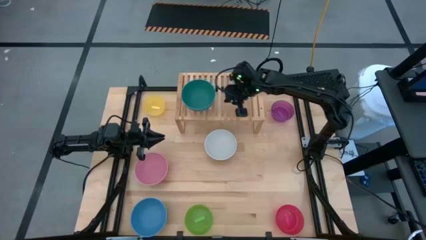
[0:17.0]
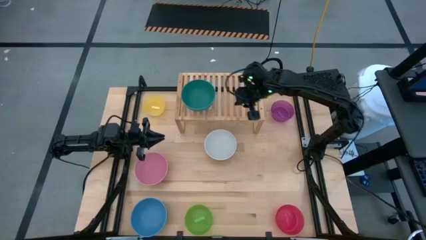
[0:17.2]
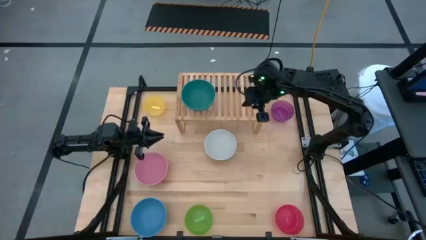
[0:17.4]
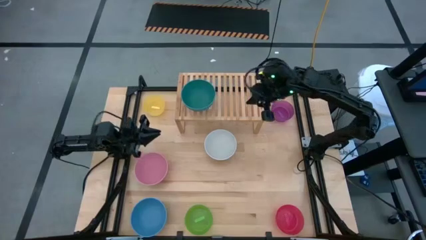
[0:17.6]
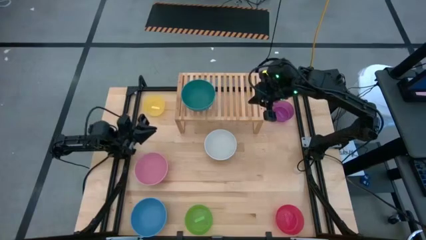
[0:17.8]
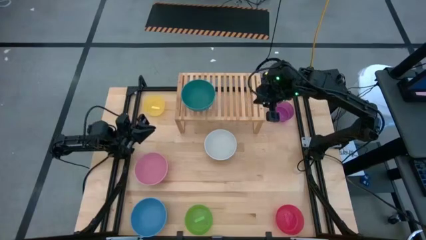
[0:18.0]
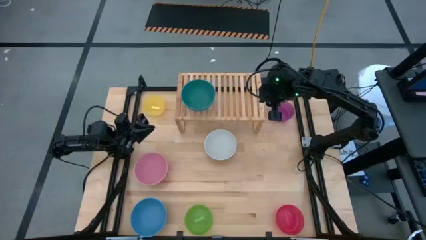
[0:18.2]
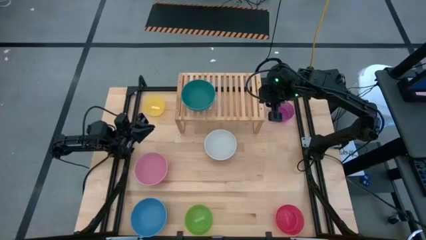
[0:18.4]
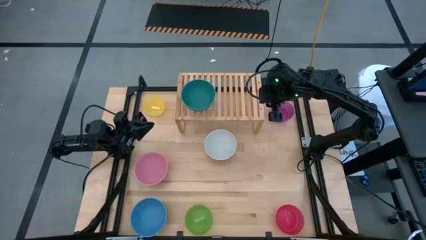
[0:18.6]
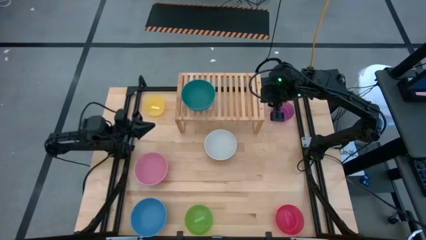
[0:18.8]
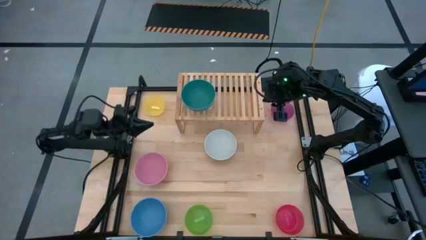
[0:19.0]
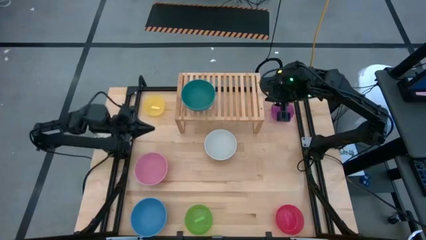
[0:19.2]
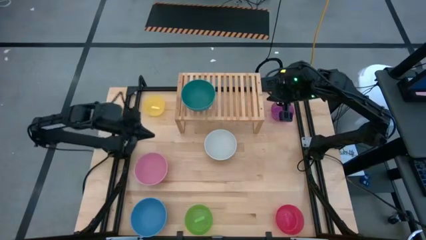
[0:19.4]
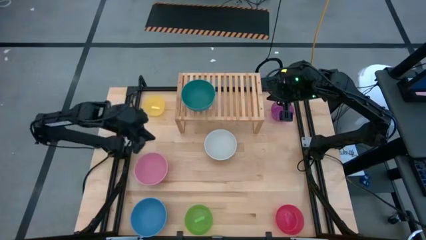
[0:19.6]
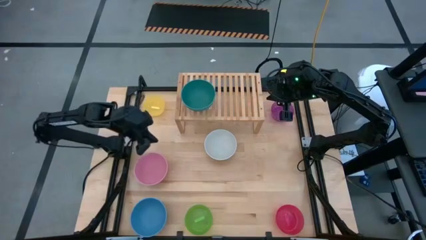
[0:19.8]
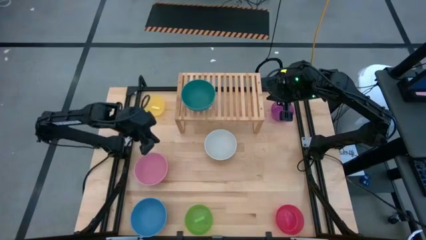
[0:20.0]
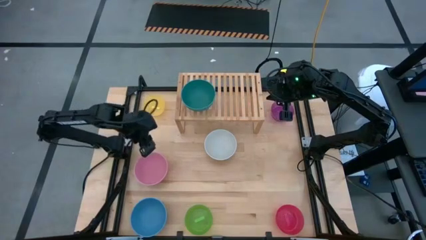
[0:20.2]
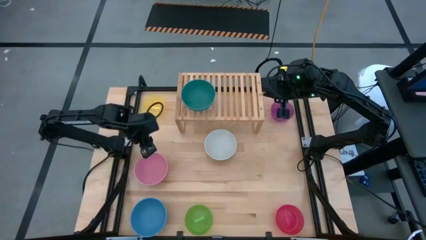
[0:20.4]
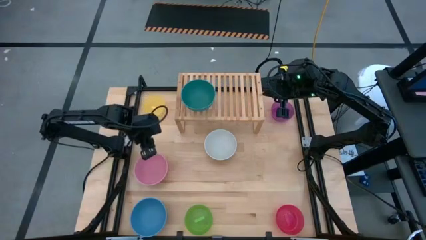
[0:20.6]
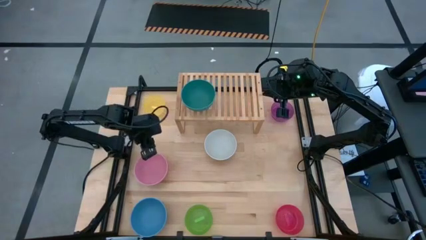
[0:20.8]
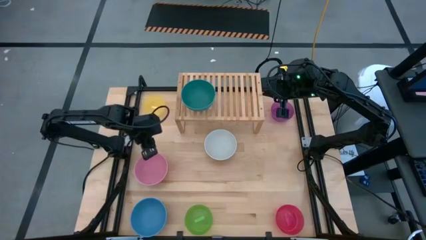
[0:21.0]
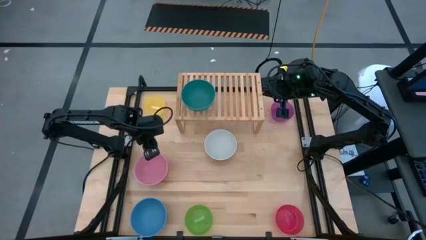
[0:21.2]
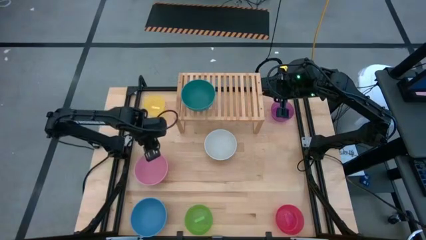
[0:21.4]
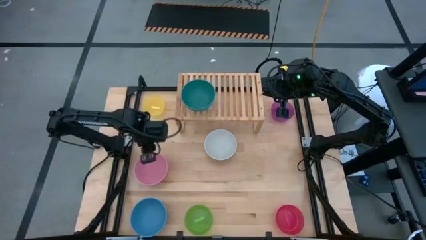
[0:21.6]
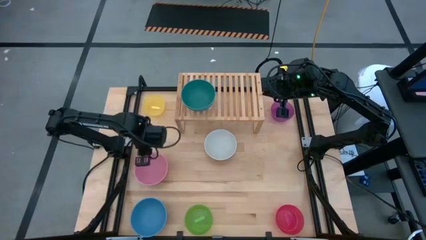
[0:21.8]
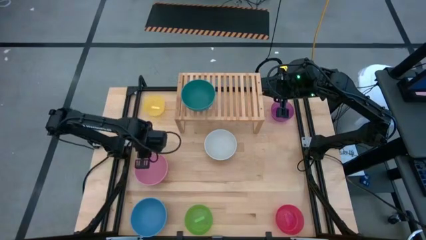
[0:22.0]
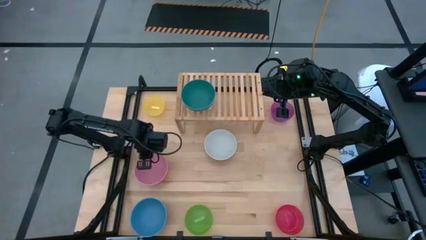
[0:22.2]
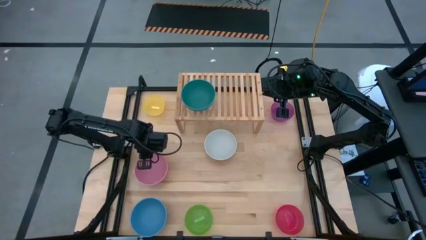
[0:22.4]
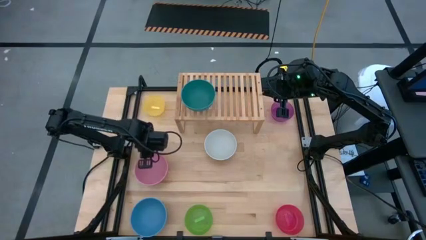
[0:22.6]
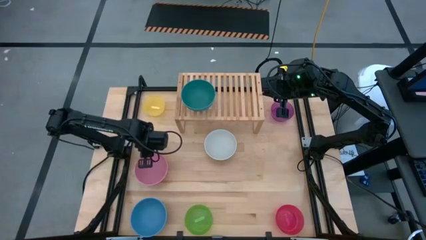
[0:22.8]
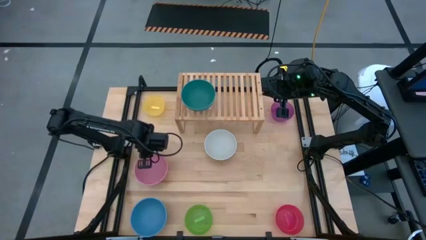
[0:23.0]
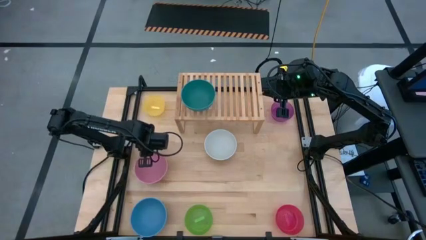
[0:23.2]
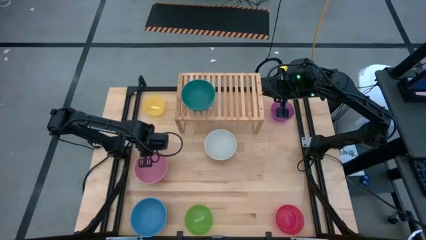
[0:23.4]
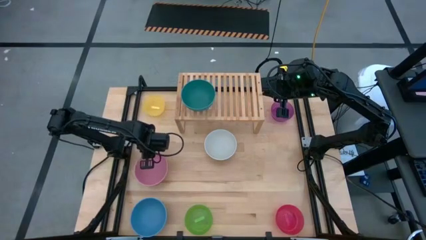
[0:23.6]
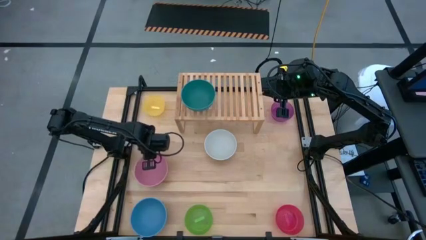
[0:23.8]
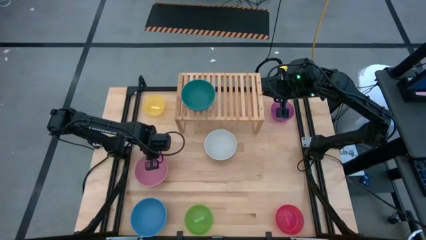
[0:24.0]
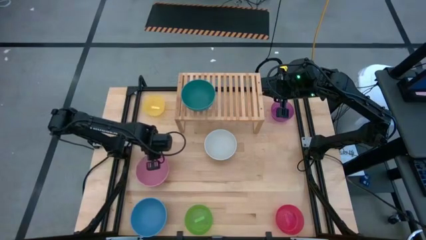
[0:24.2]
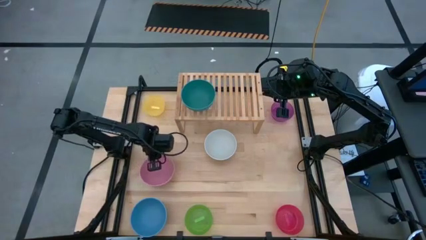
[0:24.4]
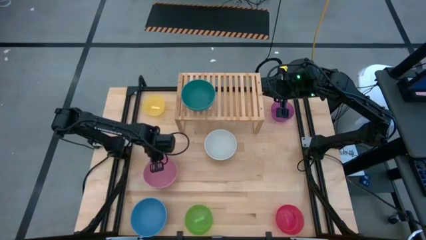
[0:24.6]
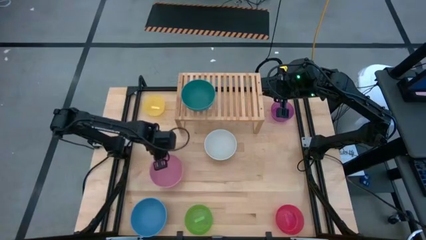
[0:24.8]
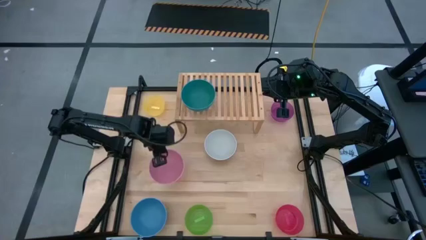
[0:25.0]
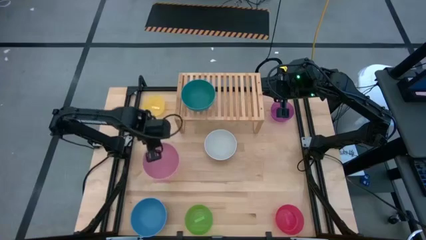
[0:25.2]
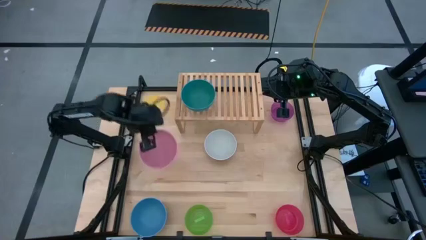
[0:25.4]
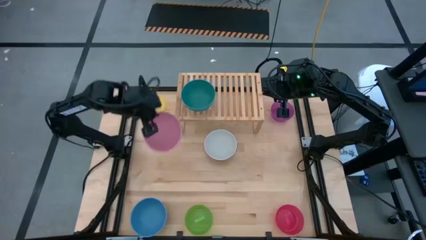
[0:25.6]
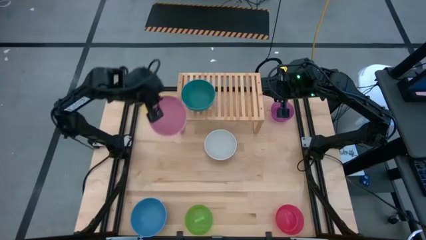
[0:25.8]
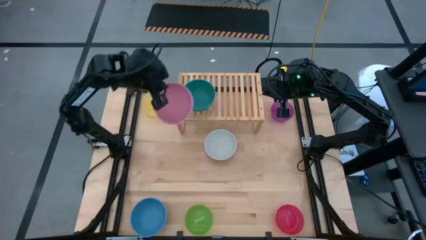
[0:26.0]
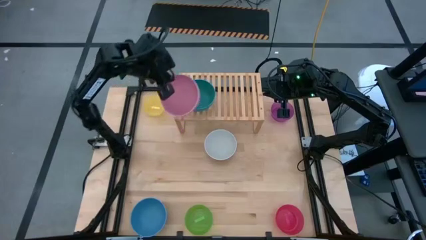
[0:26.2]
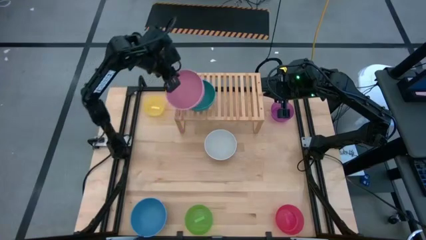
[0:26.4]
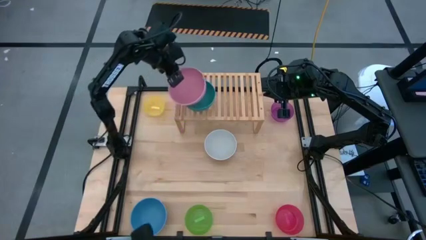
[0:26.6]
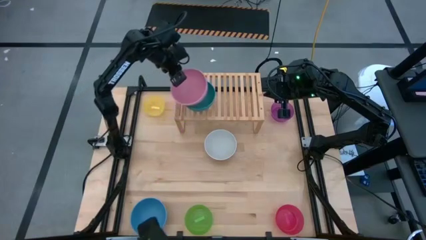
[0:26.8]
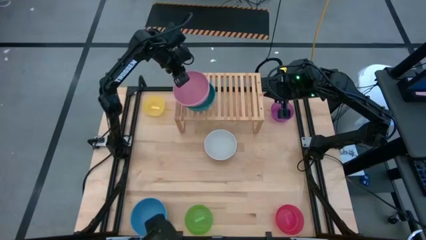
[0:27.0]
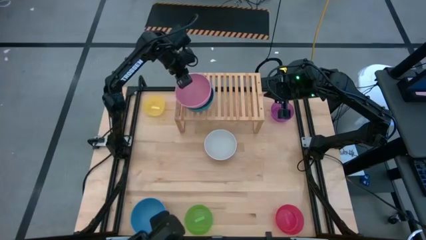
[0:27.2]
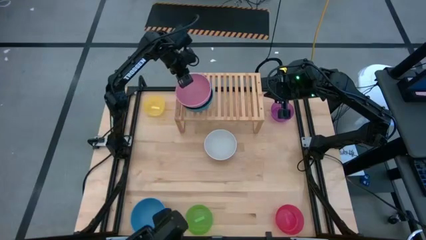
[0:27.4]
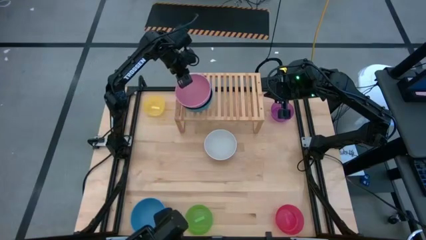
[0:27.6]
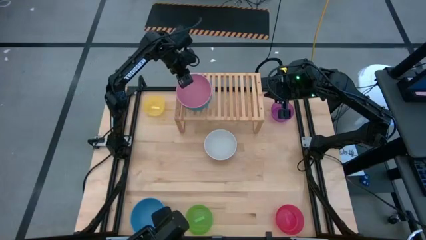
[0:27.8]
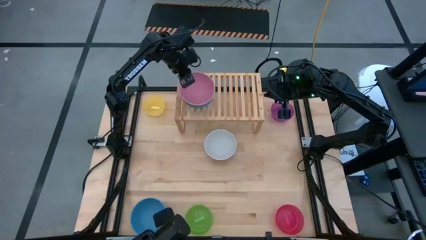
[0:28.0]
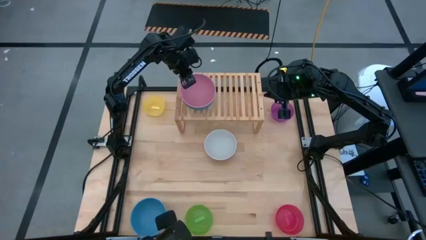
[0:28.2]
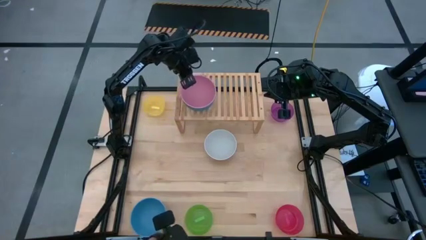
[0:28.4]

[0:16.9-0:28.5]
Task: Place and stack bowls onto a shelf
Stack the pink bowl on top of the green bowl on the shelf

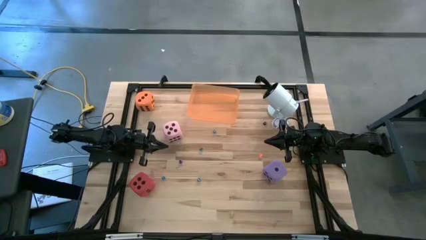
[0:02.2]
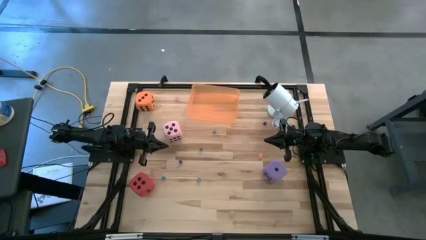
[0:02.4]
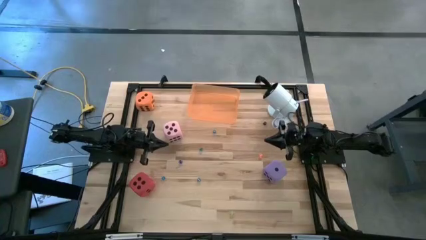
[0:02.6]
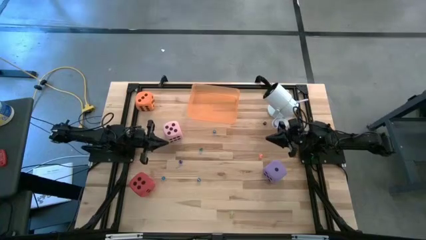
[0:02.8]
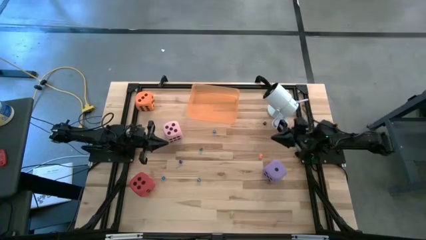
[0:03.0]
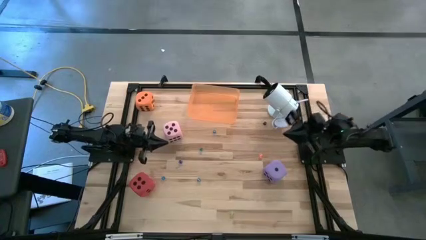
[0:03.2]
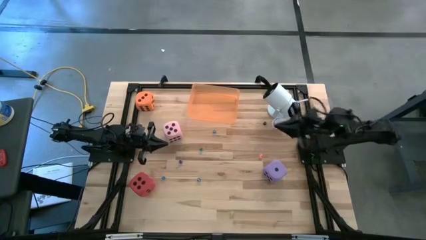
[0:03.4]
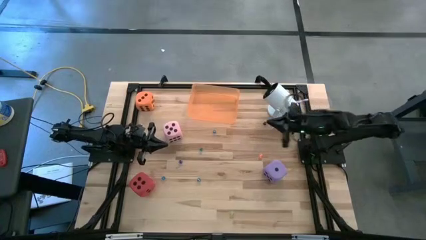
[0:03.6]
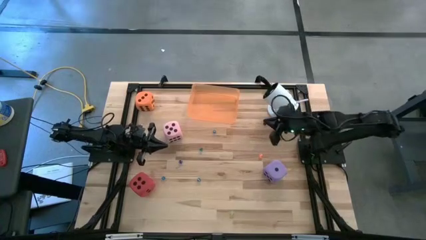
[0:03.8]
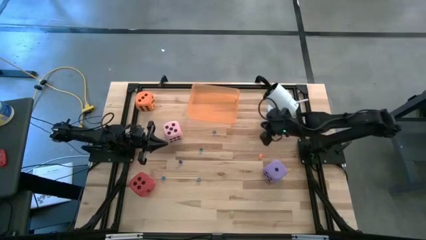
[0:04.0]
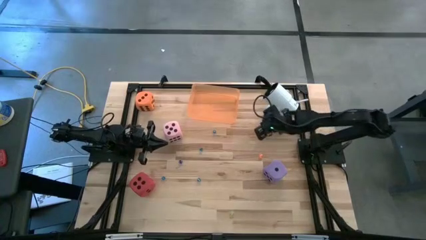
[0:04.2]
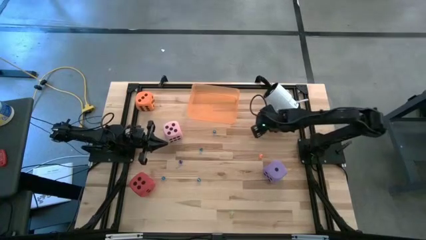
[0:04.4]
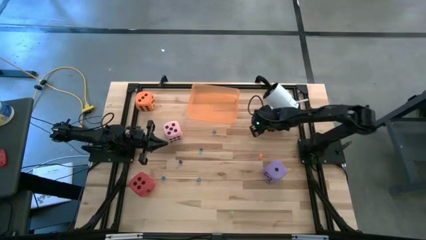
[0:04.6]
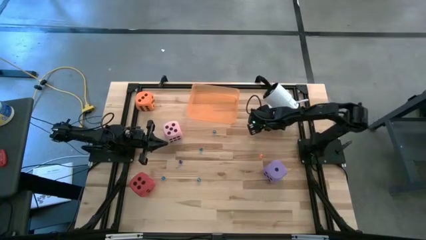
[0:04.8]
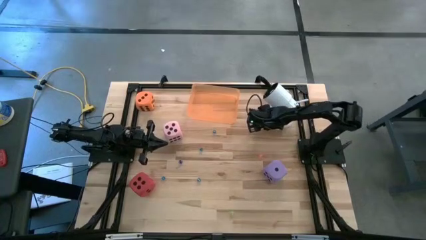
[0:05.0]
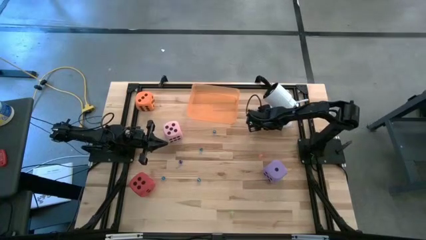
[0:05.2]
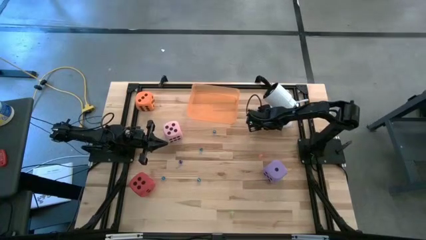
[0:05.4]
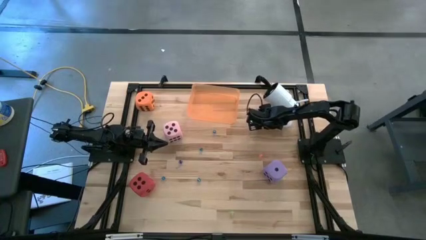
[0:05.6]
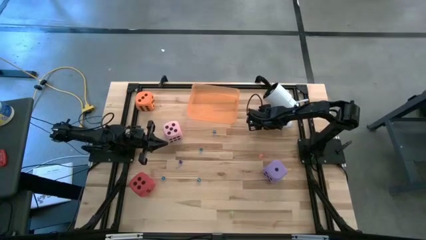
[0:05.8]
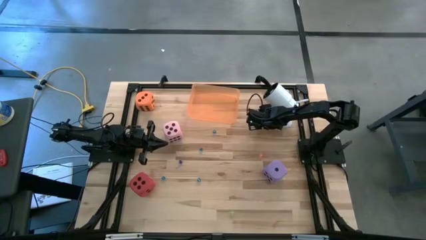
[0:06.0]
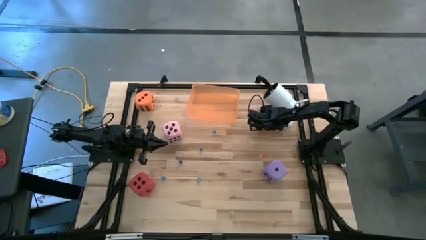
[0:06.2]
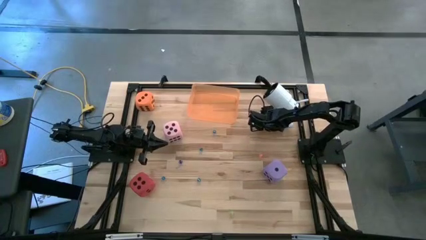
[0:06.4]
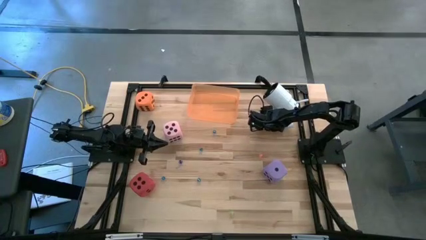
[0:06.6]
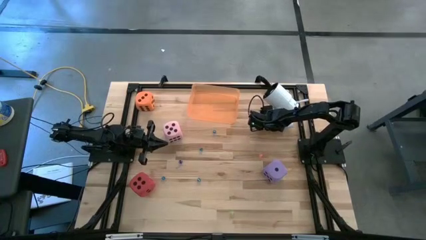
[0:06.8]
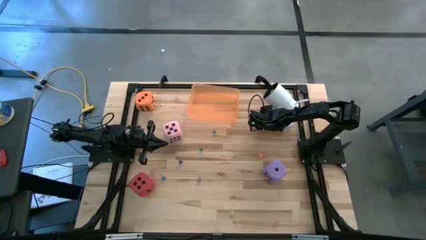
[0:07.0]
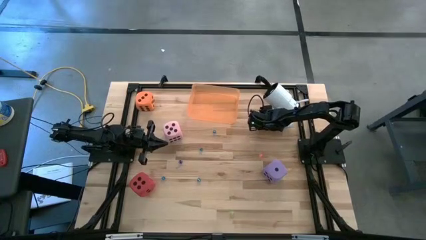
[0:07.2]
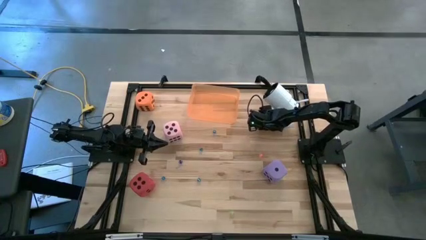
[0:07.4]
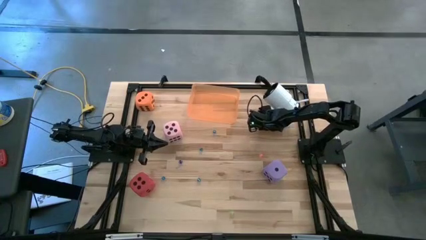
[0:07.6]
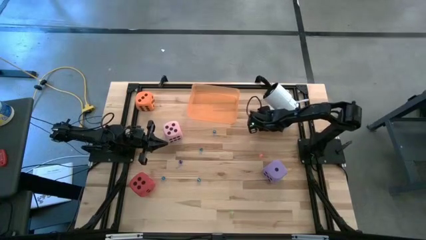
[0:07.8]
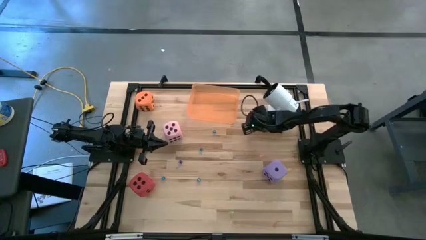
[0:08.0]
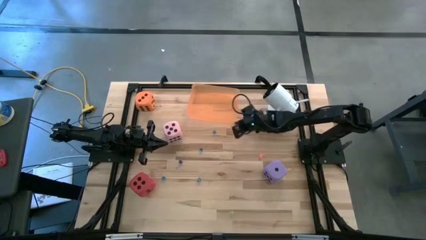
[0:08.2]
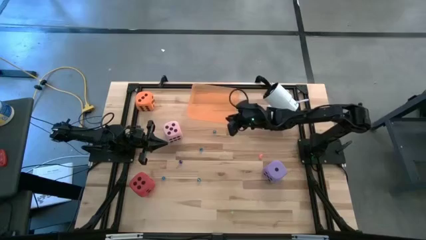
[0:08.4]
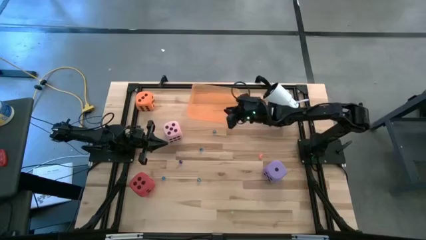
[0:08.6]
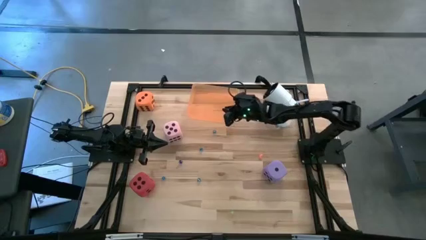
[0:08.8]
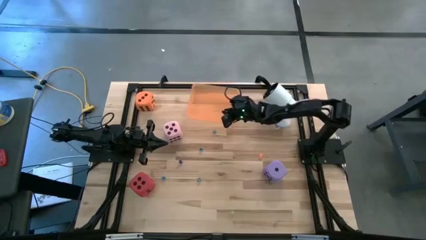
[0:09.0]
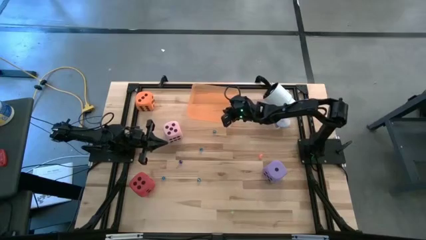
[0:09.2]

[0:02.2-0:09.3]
Task: Pick & Place Dice
Put the small black dice in the orange bin
